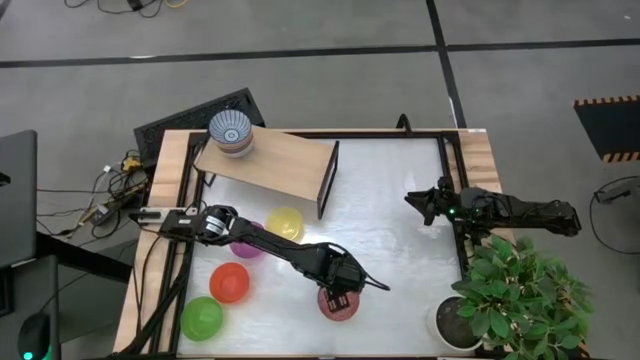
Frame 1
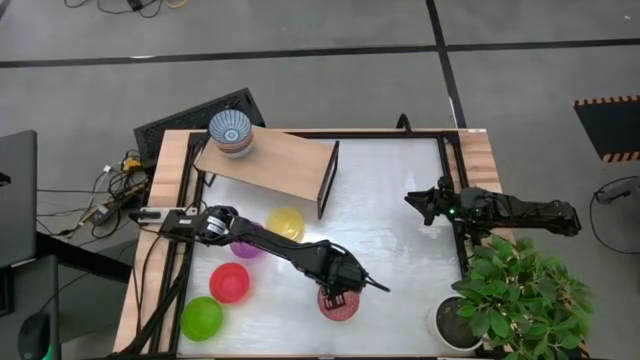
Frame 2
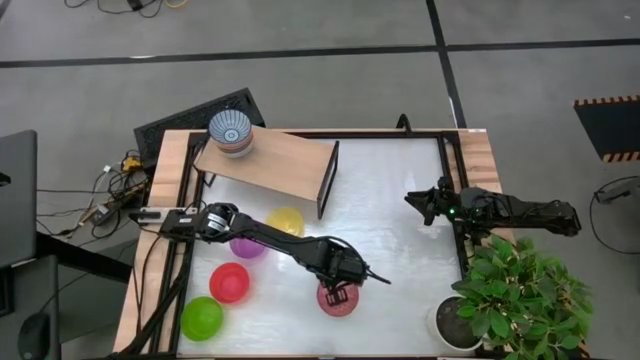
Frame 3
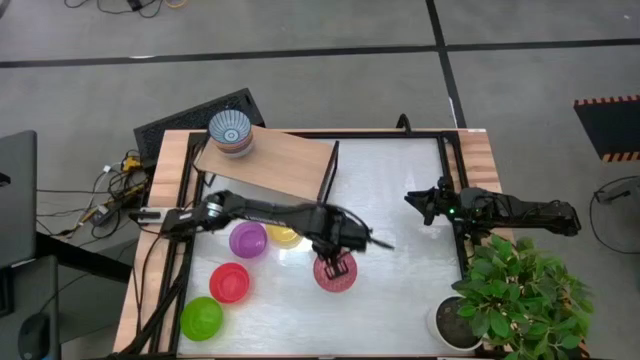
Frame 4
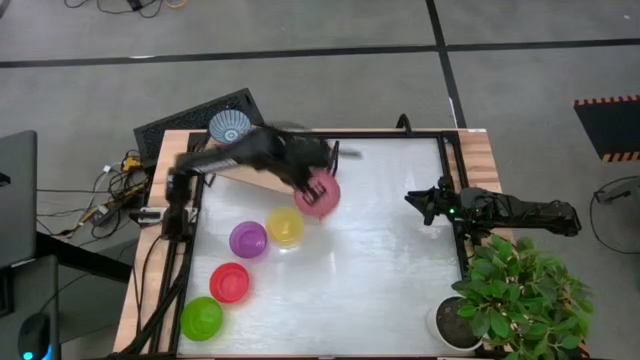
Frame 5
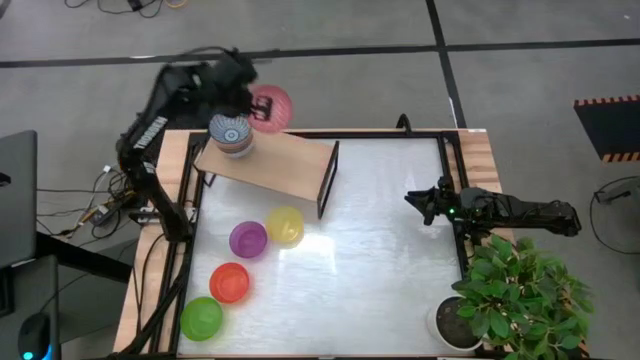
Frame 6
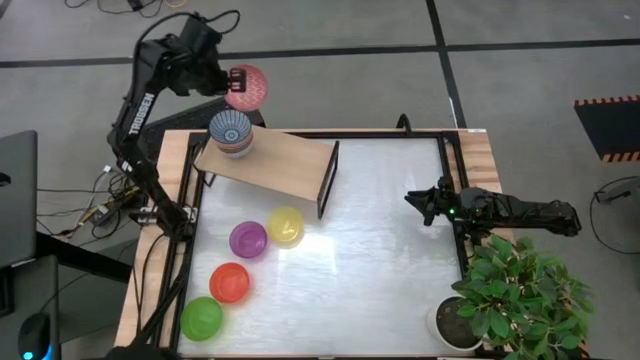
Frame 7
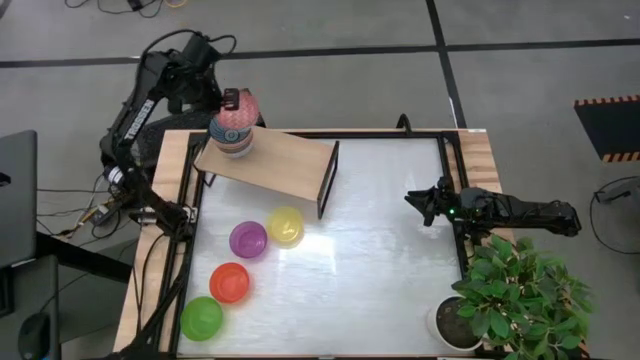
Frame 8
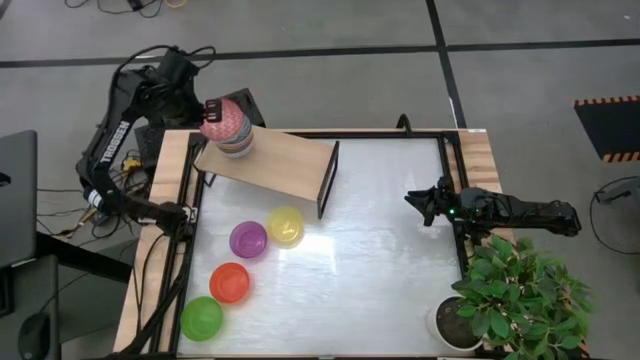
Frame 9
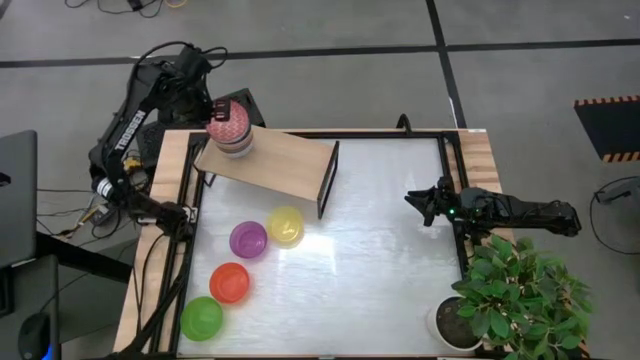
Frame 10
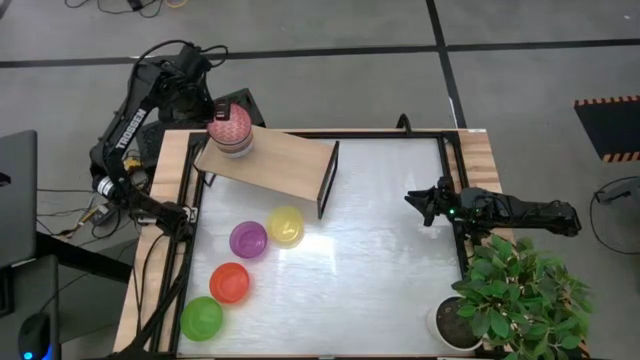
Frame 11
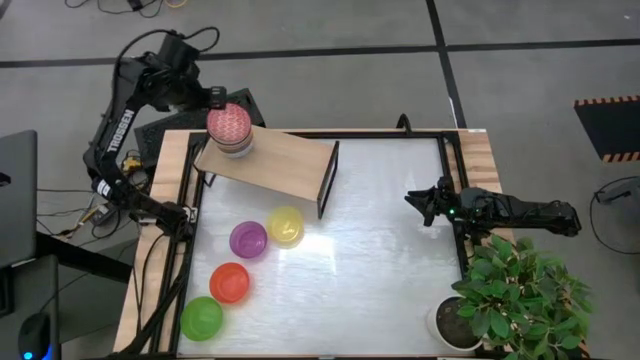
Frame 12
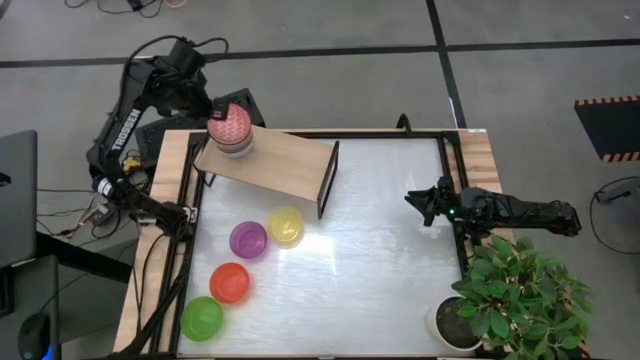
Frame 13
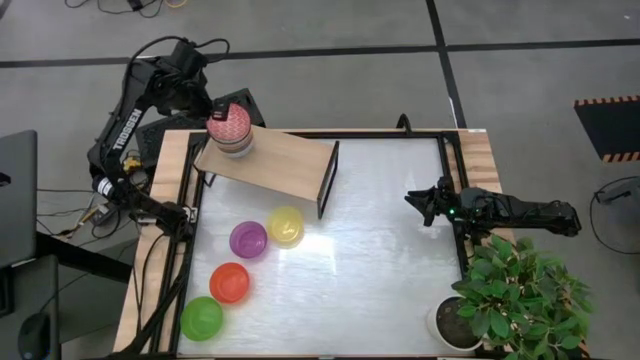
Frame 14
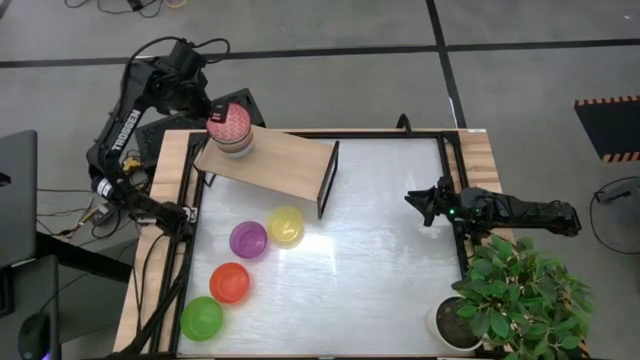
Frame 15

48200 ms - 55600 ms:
Task: Place and stack bowls onto a shelf
Stack the red patterned bowl on top of the blue patterned bowl on the shelf

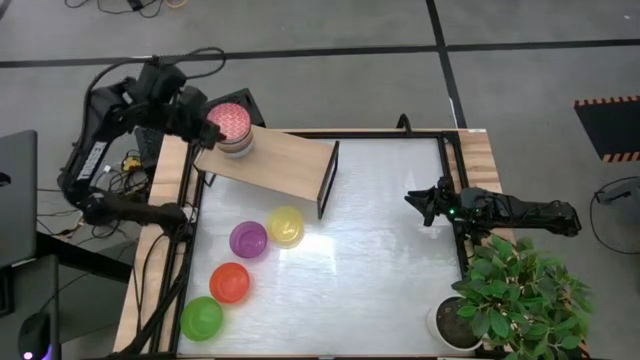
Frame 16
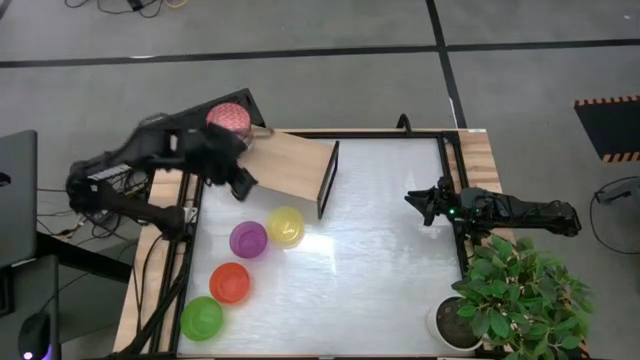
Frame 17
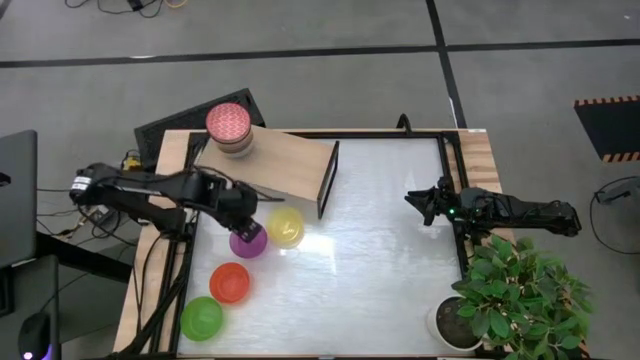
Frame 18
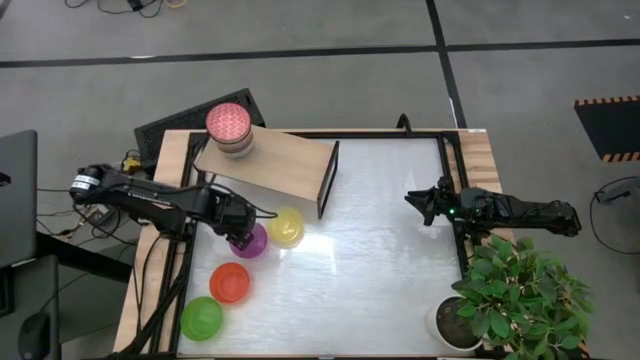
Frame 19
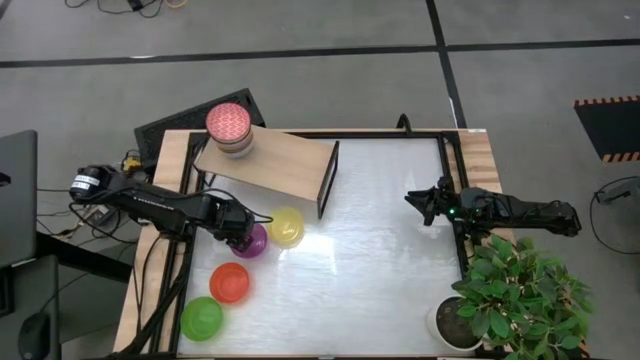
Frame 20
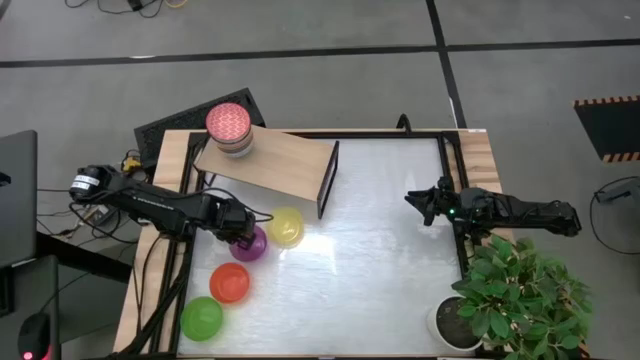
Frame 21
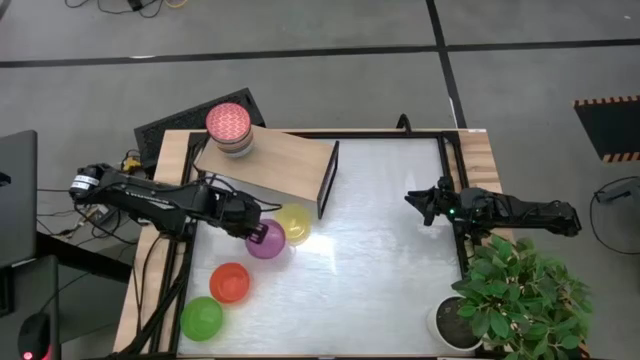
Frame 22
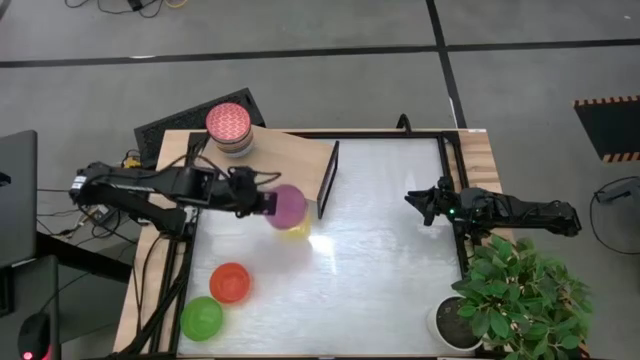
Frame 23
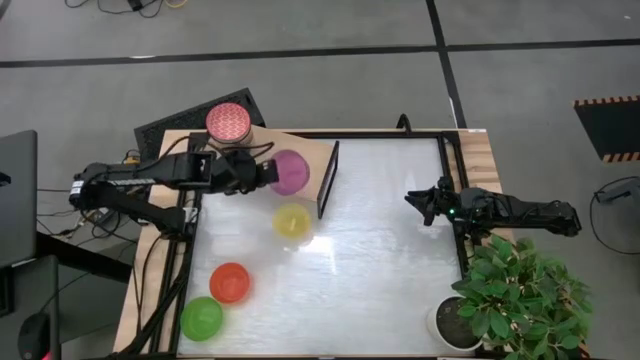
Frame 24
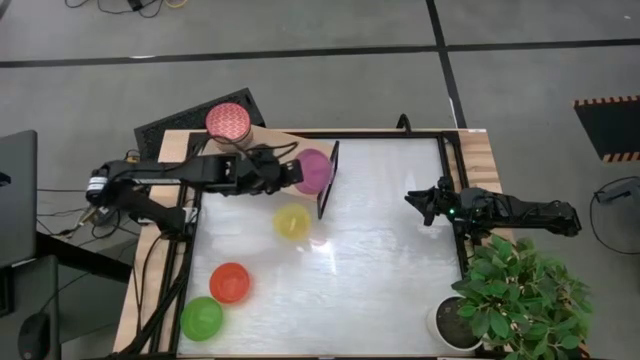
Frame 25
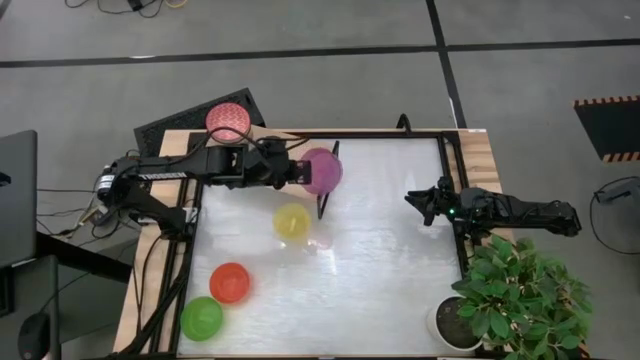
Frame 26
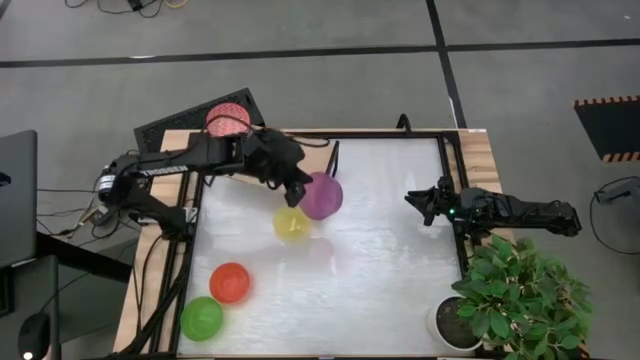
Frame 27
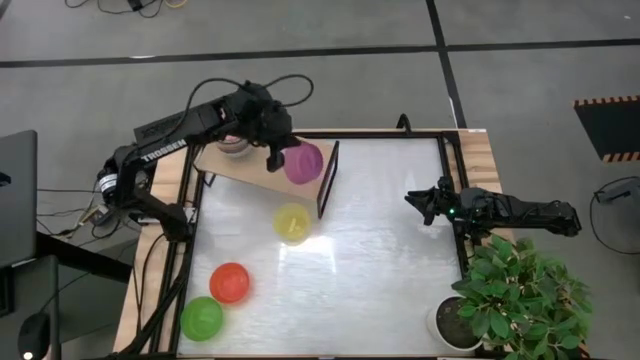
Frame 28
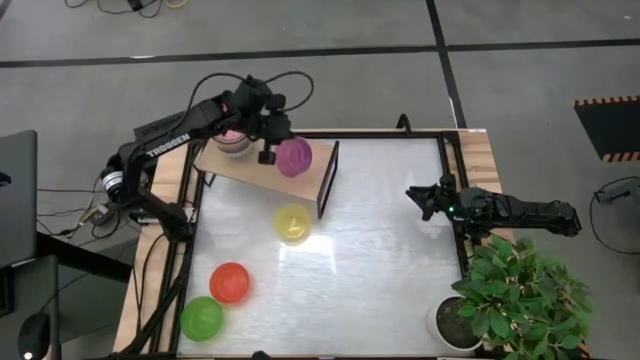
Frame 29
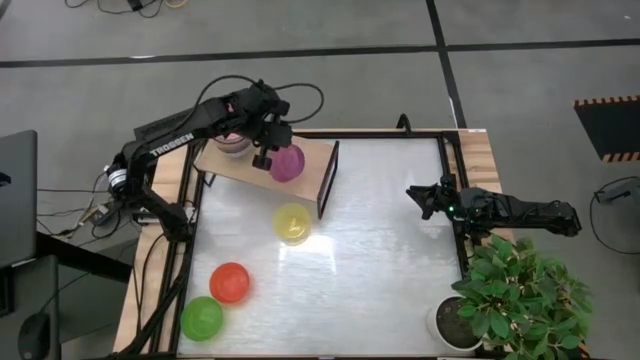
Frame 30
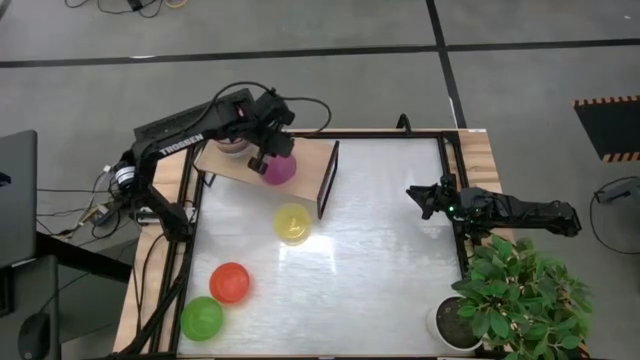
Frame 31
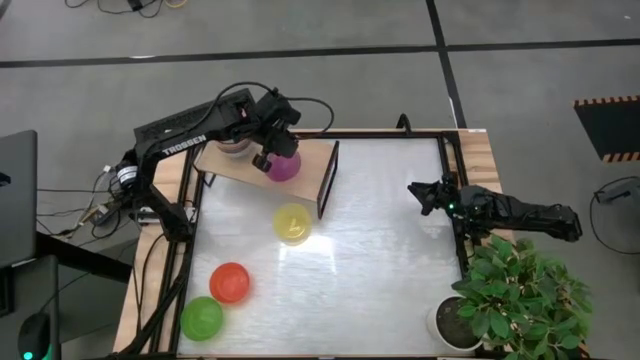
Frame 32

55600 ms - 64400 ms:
Put the purple bowl on the shelf

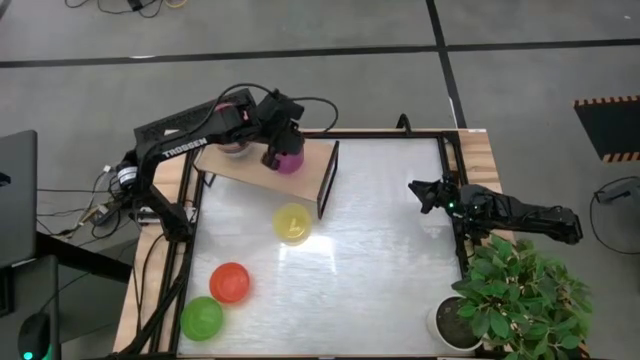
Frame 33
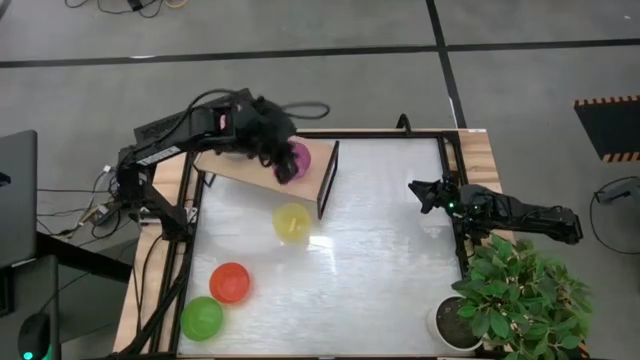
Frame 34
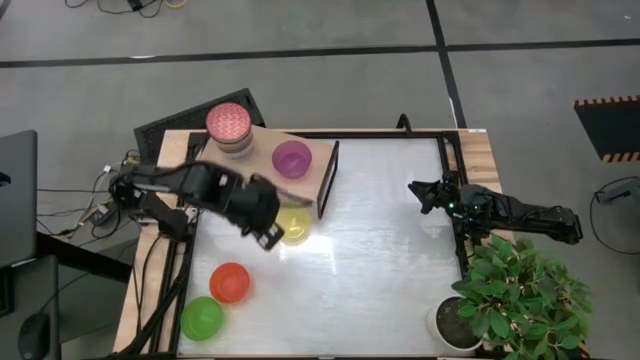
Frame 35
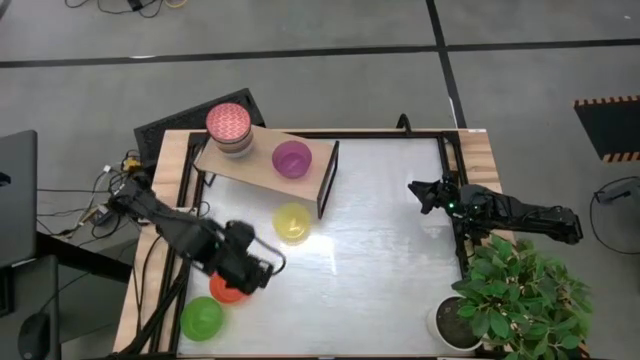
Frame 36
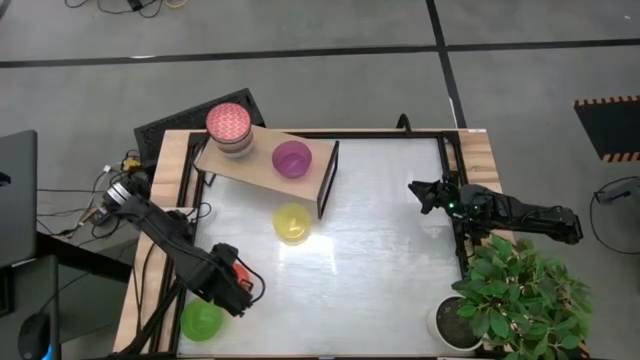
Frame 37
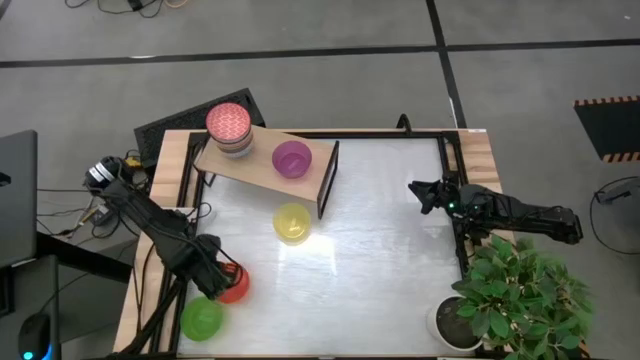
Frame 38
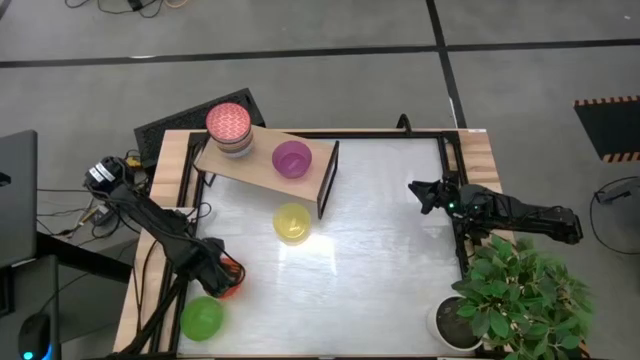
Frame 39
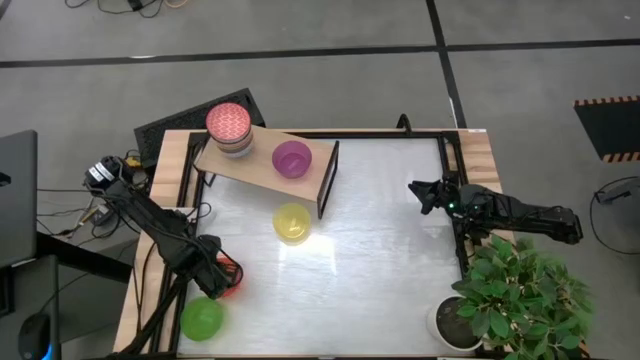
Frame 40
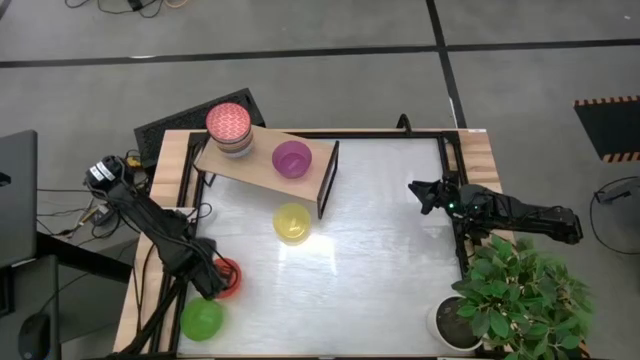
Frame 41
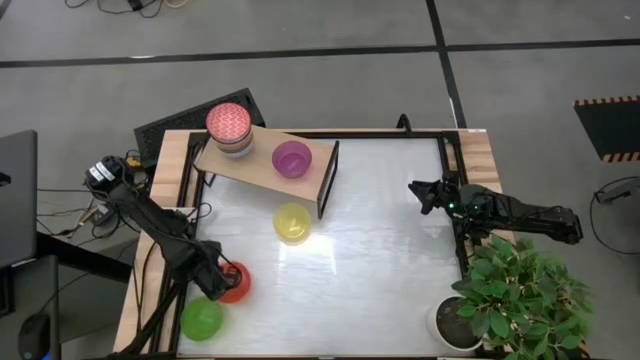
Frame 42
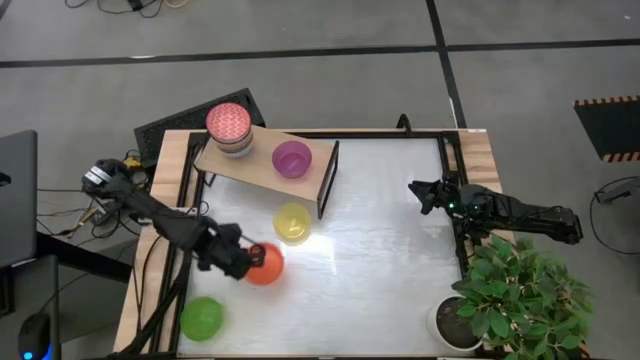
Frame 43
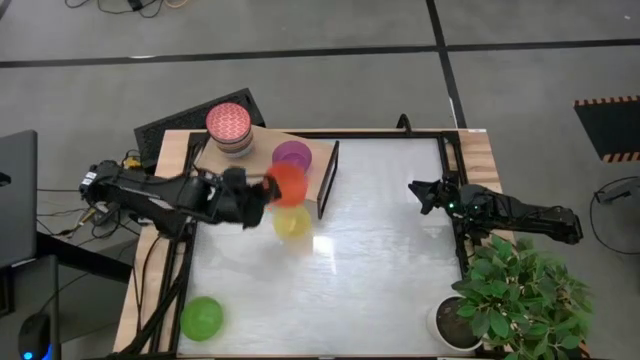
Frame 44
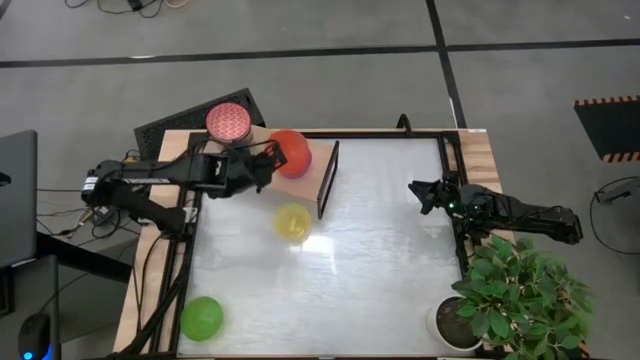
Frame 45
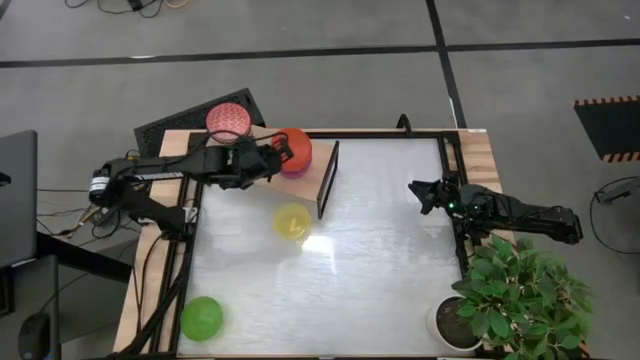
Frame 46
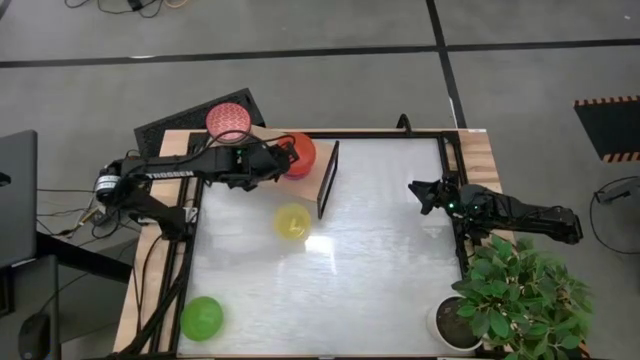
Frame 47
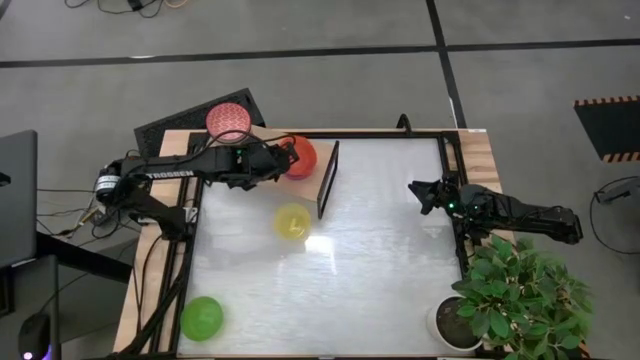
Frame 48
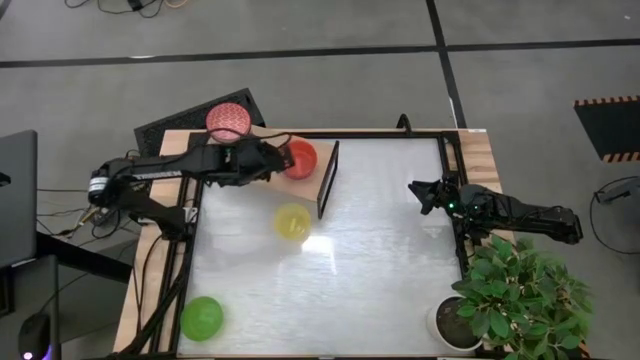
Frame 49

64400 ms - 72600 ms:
Stack the orange bowl on top of the purple bowl on the shelf
